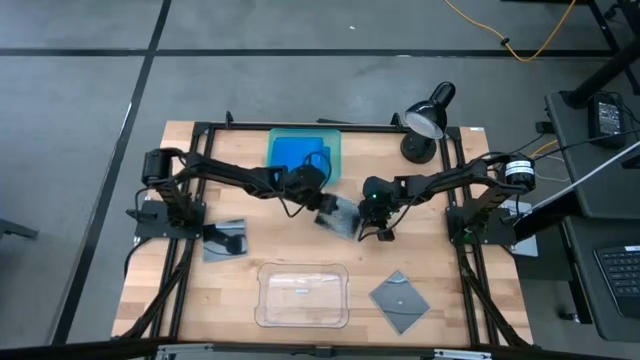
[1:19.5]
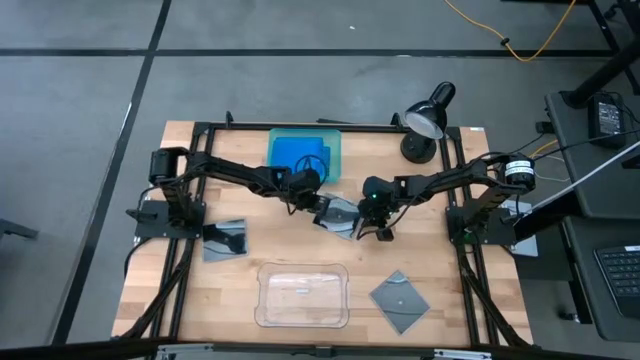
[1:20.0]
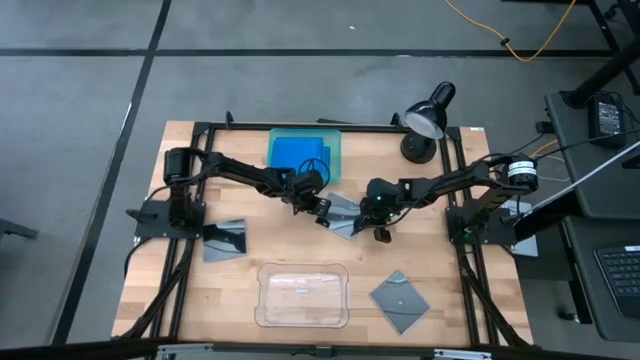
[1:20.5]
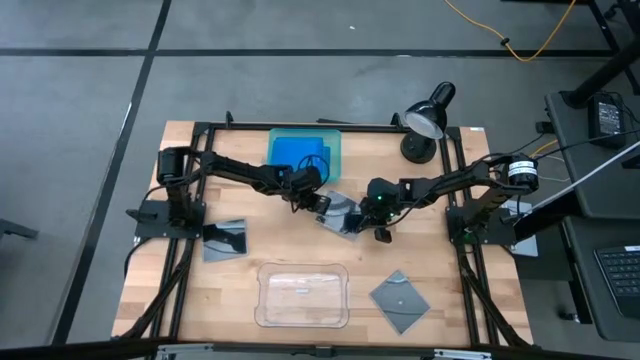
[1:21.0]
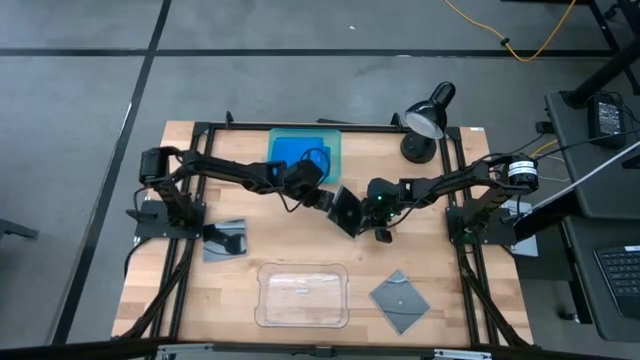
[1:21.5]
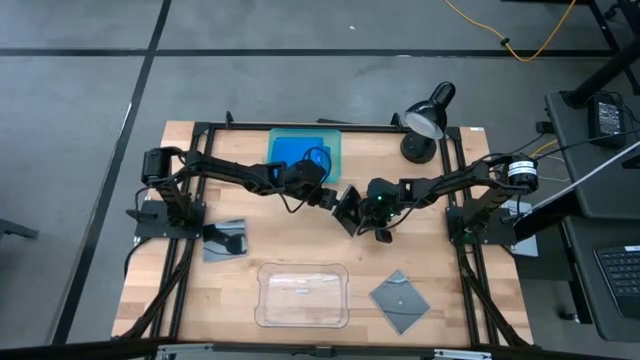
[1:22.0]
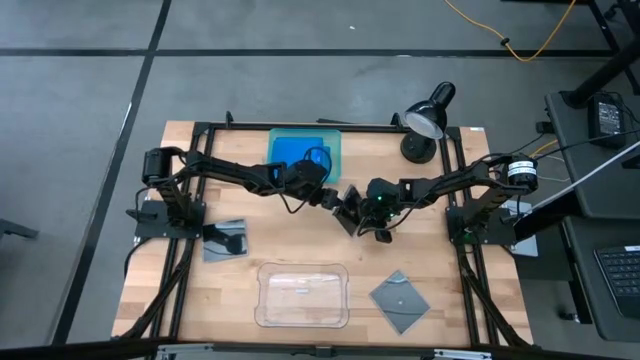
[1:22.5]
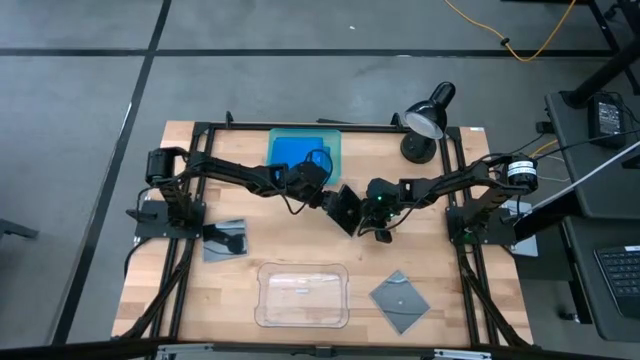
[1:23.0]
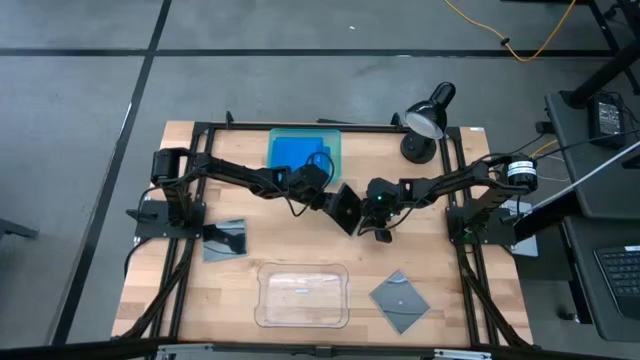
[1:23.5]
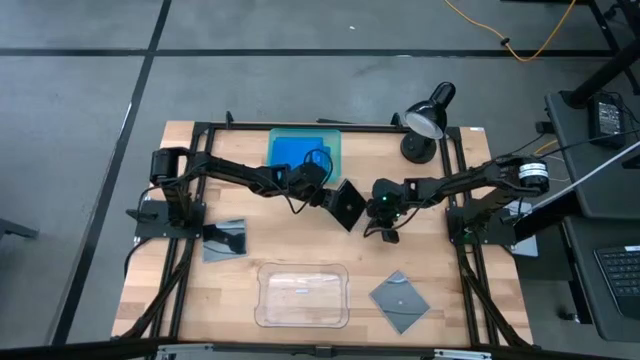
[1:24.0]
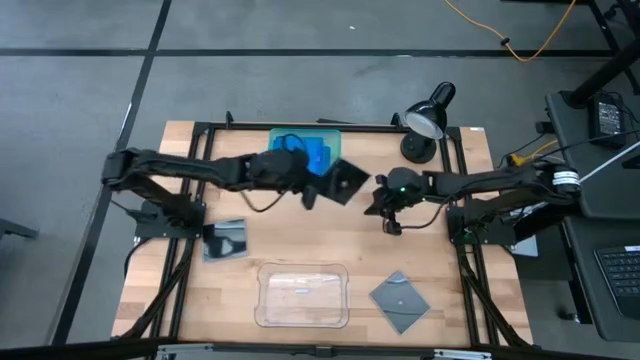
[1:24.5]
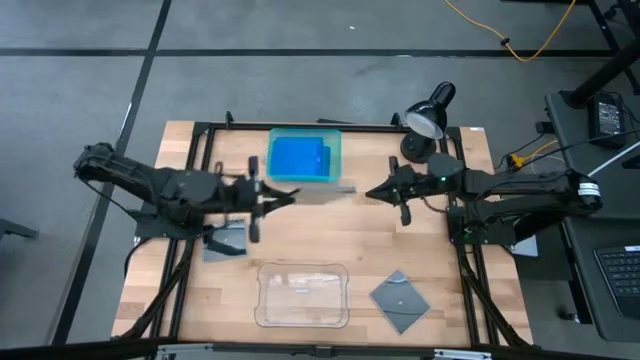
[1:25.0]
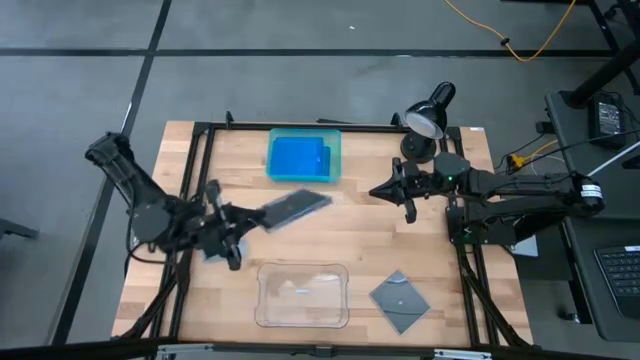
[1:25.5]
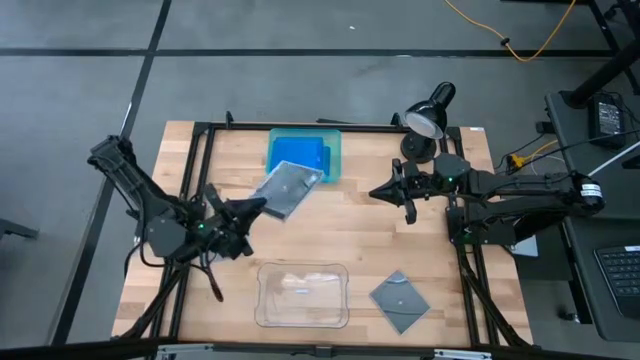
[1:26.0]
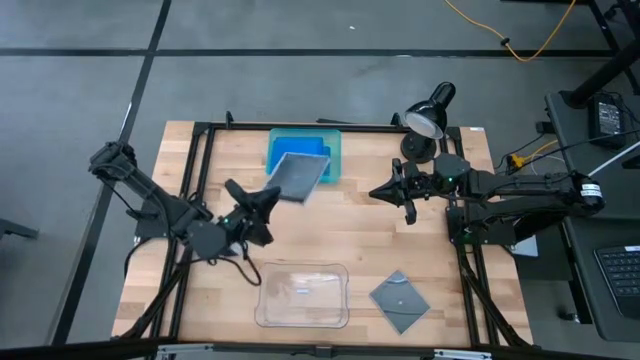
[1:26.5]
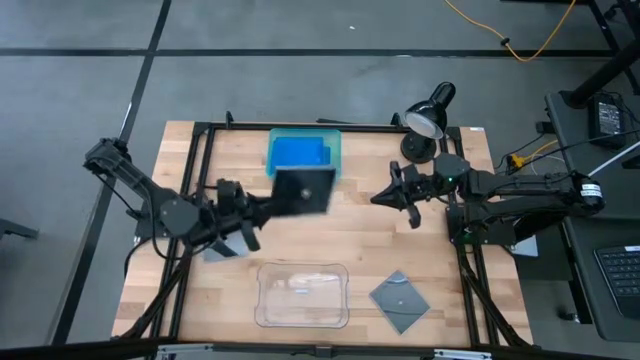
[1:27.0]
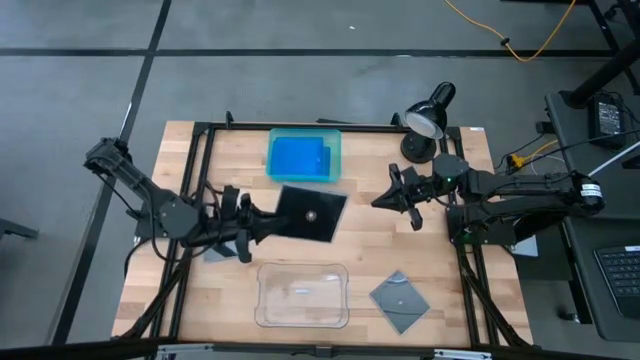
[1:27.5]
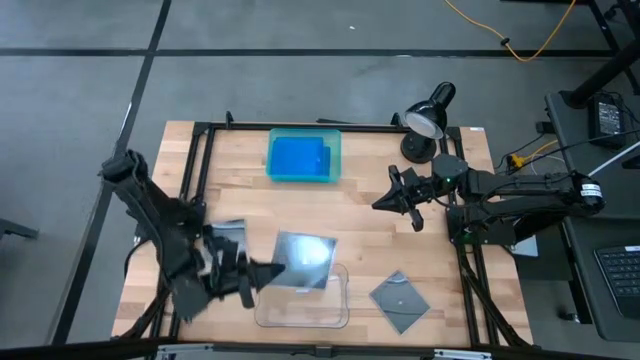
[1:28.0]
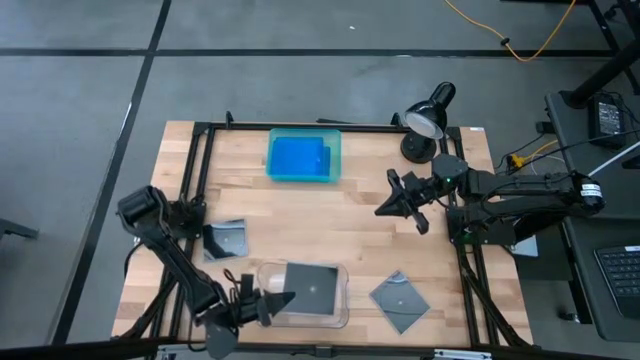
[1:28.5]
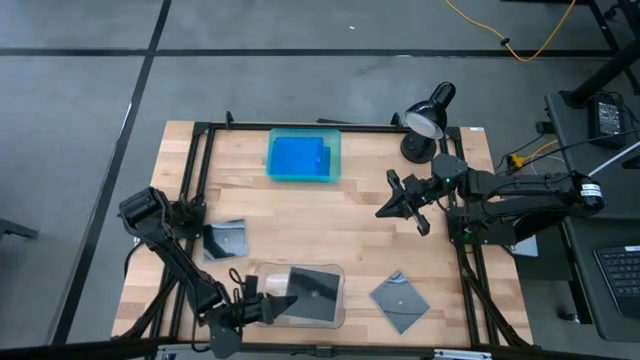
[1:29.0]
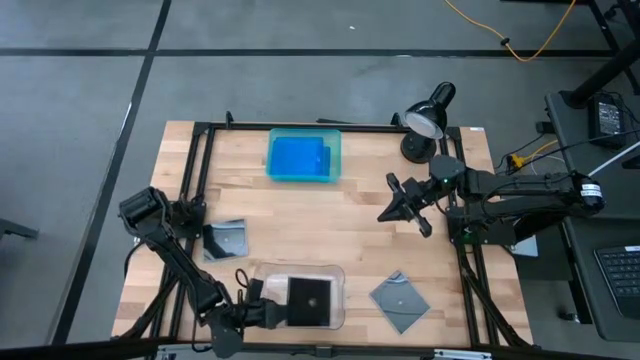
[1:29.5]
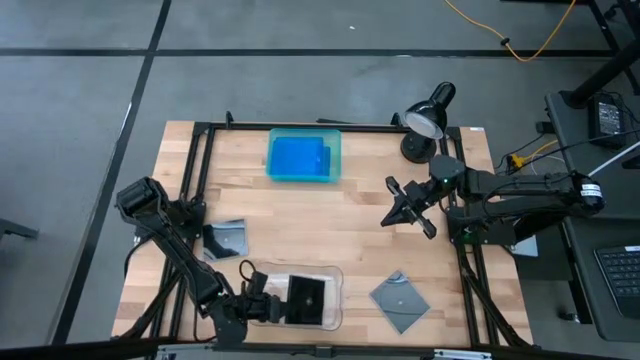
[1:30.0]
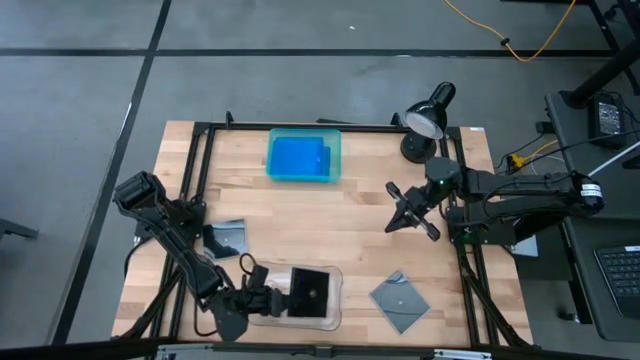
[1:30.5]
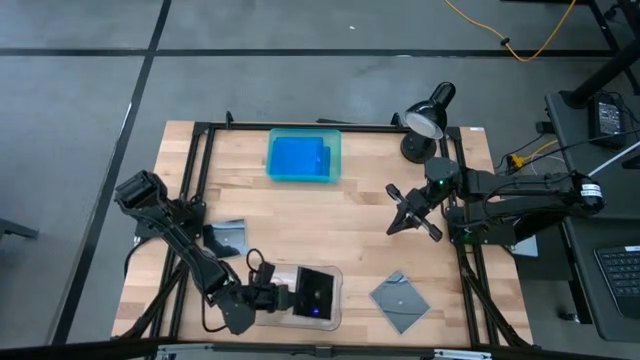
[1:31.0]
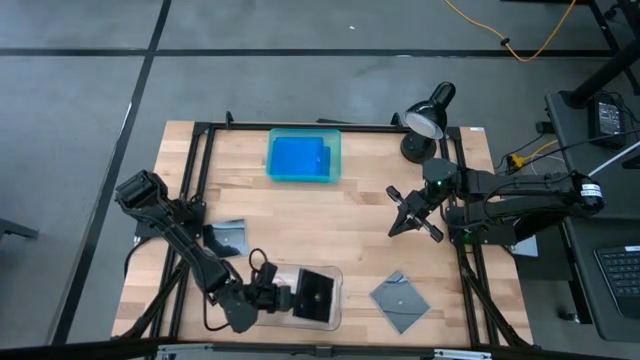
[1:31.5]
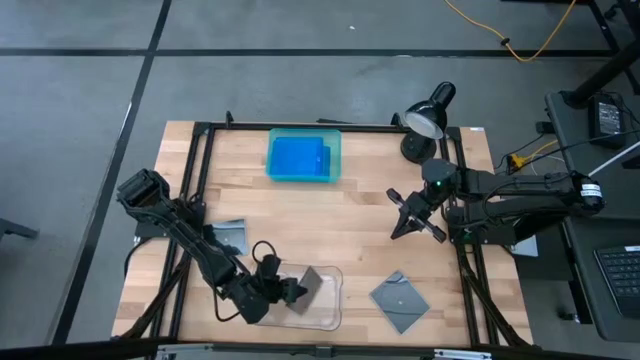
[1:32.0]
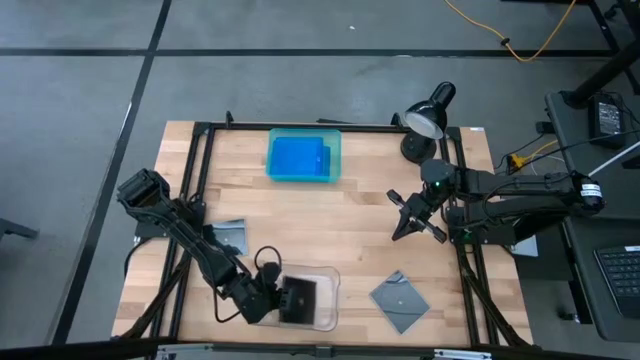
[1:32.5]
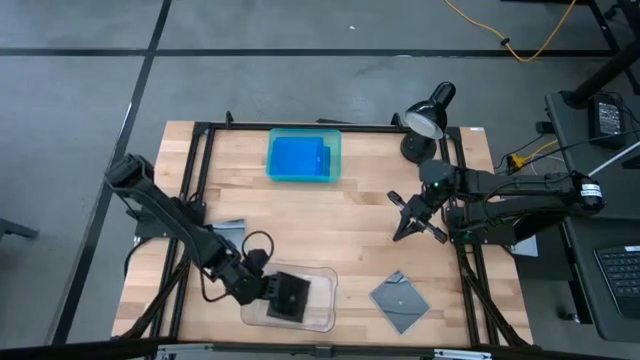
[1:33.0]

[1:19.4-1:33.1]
Task: Pick & place jewel cases by type
Put the top black cd case into the transparent bin

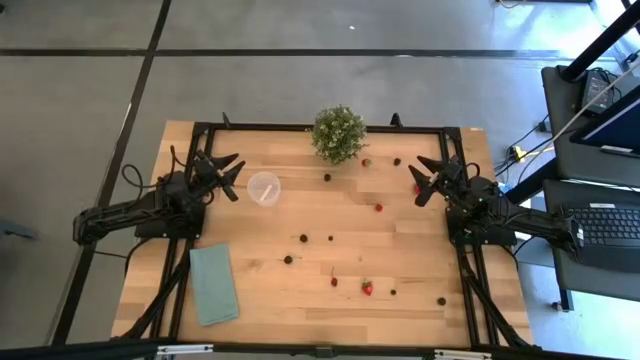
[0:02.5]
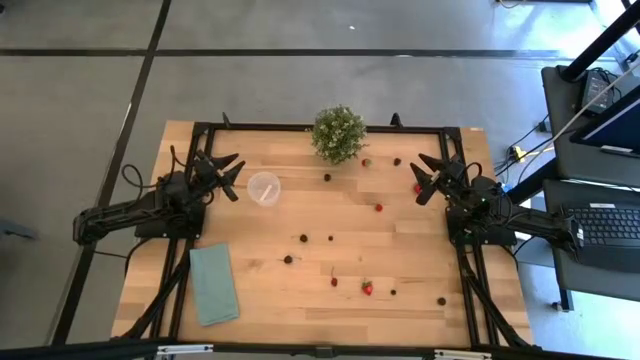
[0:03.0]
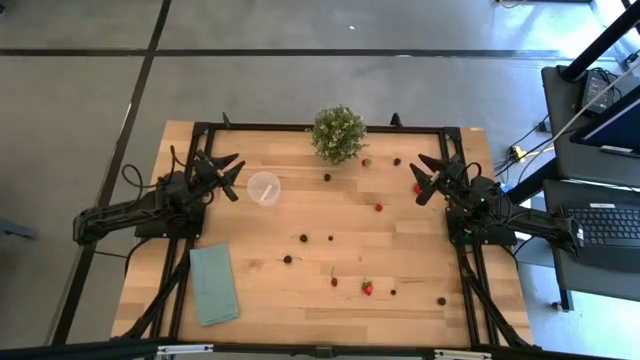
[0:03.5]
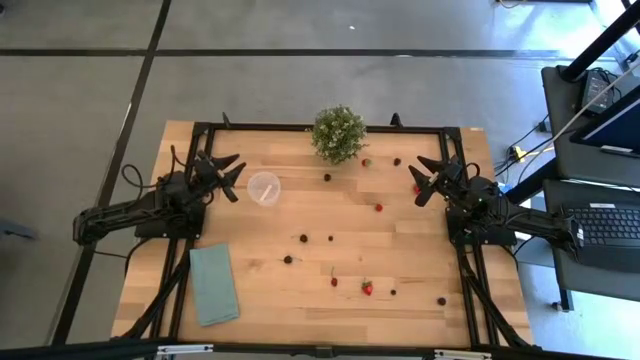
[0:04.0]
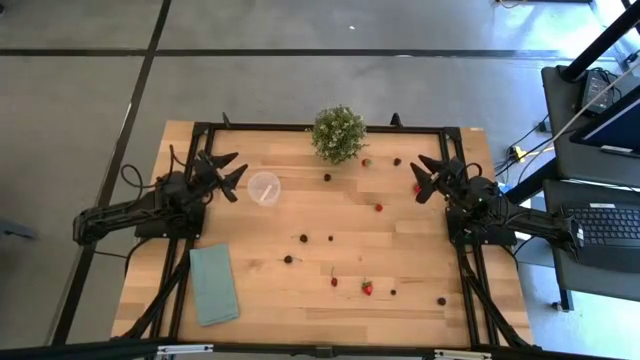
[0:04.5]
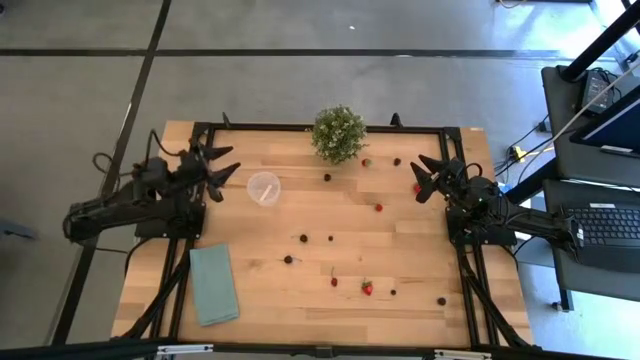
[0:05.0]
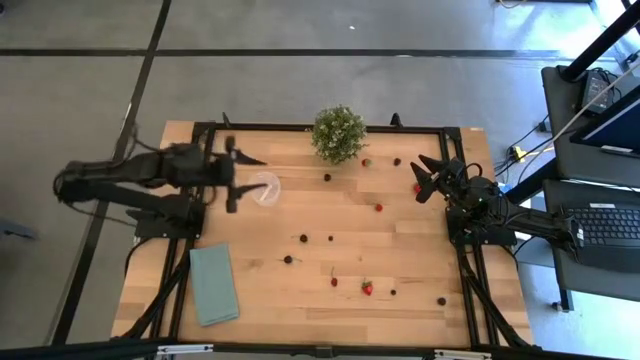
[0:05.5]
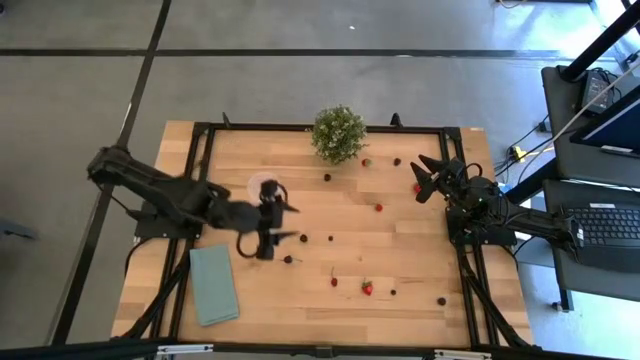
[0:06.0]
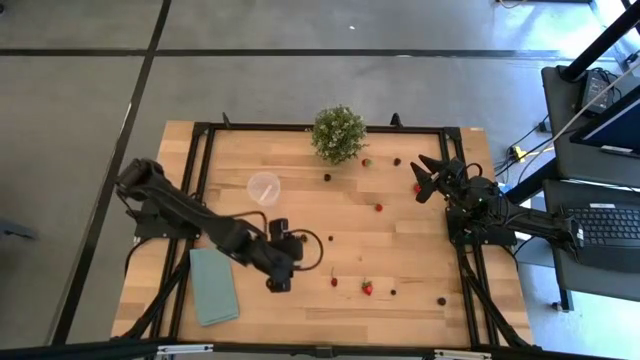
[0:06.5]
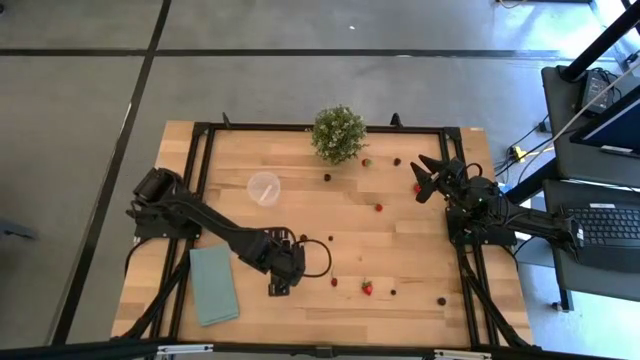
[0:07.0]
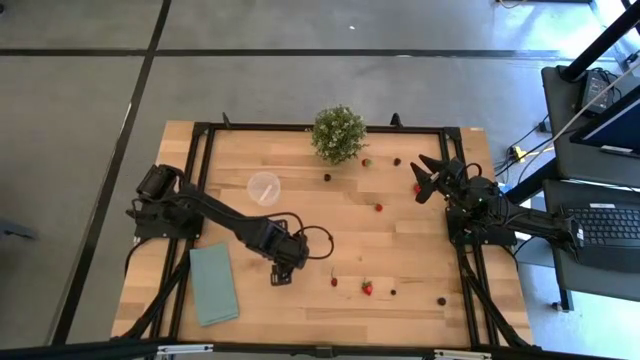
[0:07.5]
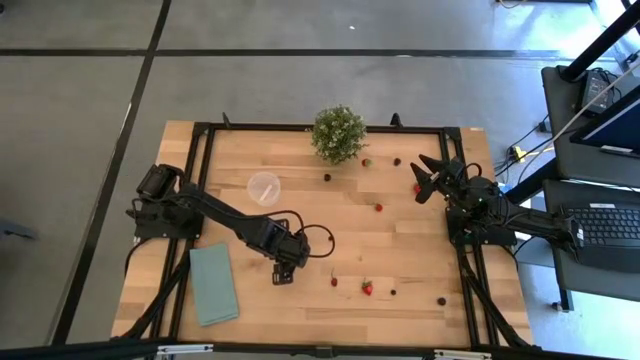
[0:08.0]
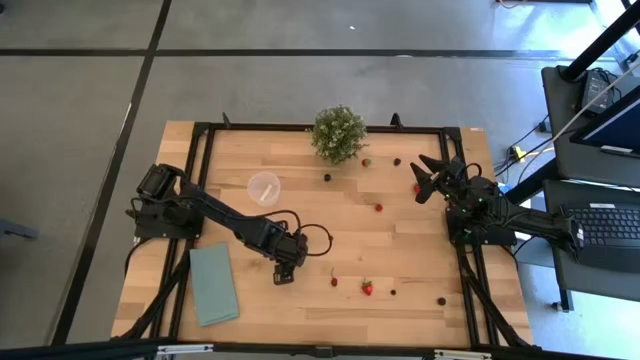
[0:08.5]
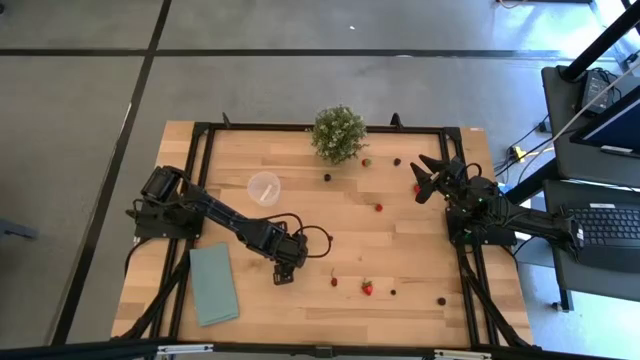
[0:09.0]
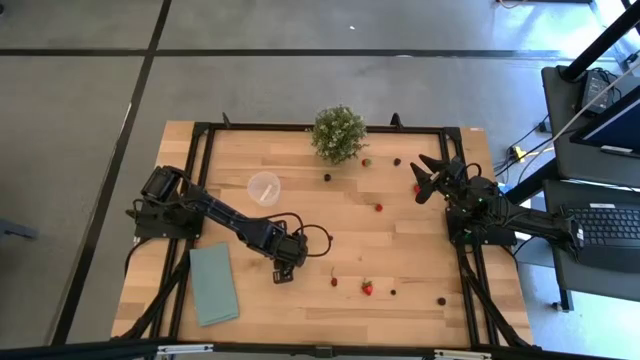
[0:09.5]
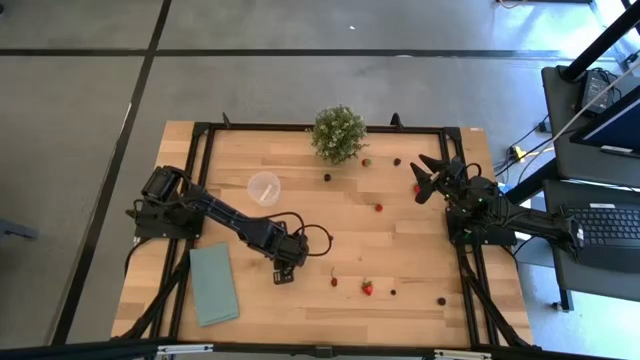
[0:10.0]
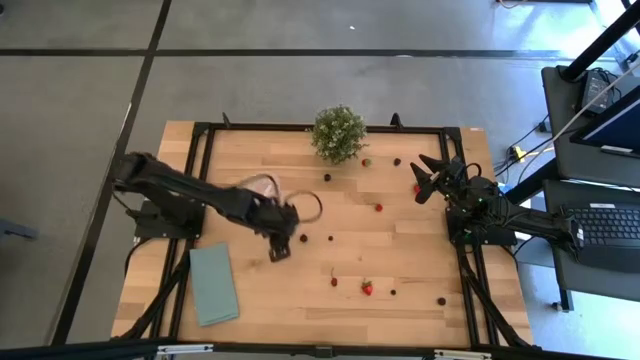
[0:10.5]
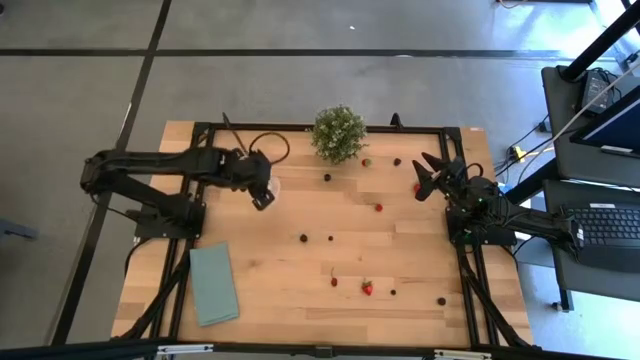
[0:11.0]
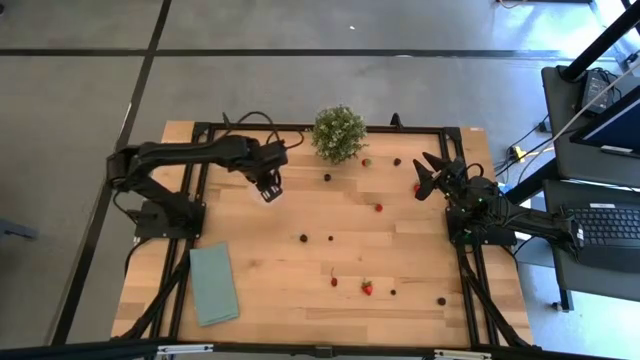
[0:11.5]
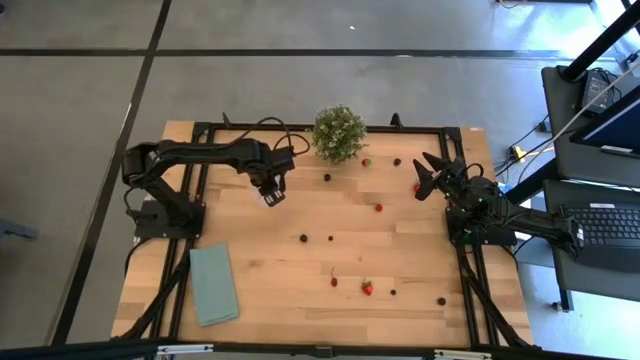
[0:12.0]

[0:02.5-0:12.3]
Task: Pick and placing Produce into tupperware
Put the black cherry into the transparent container
